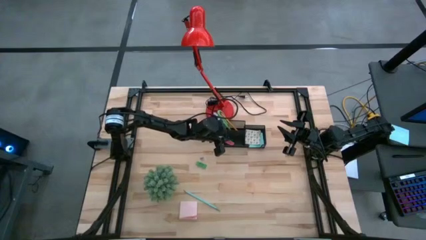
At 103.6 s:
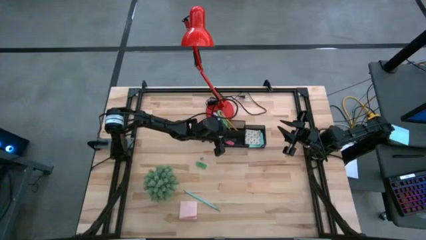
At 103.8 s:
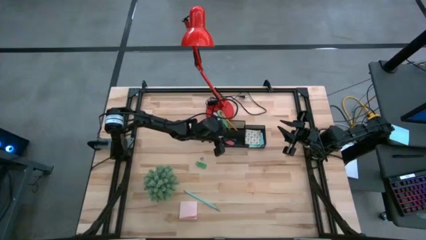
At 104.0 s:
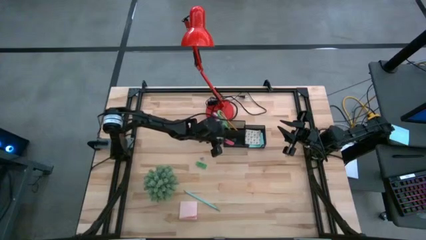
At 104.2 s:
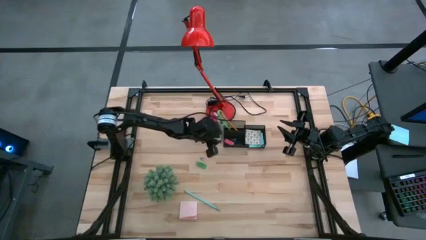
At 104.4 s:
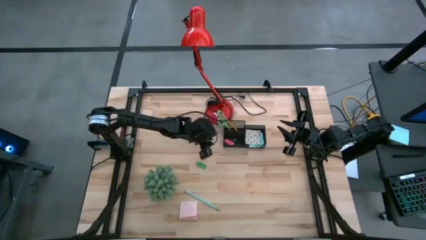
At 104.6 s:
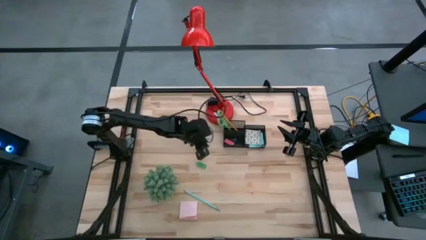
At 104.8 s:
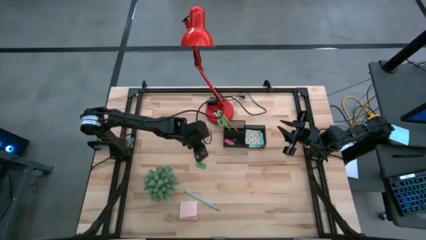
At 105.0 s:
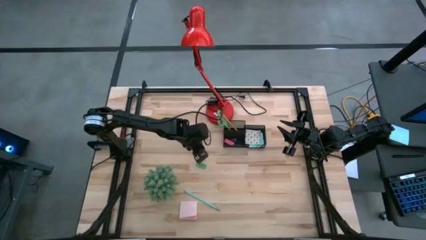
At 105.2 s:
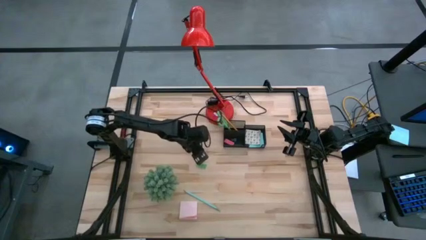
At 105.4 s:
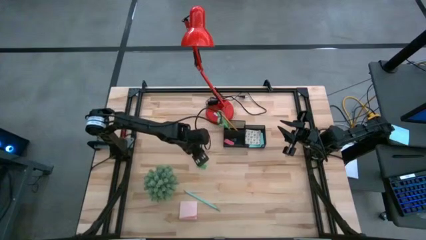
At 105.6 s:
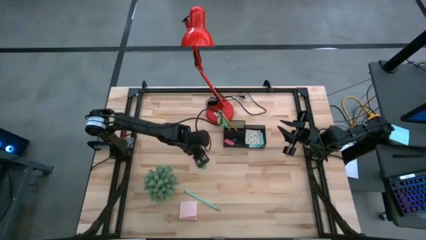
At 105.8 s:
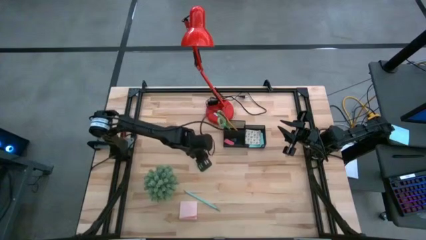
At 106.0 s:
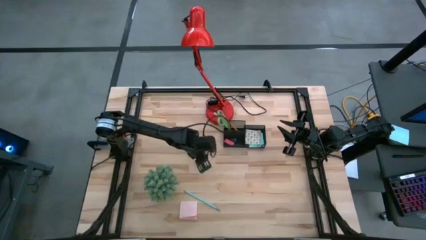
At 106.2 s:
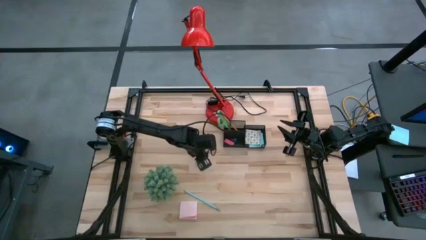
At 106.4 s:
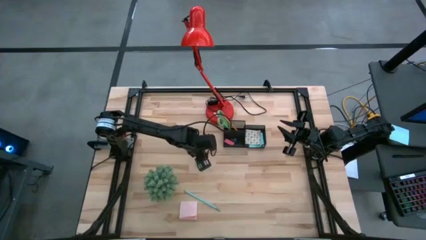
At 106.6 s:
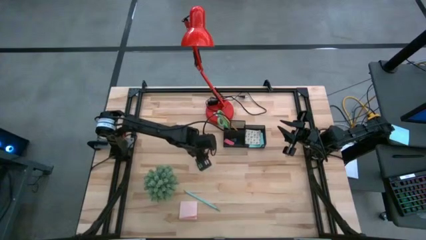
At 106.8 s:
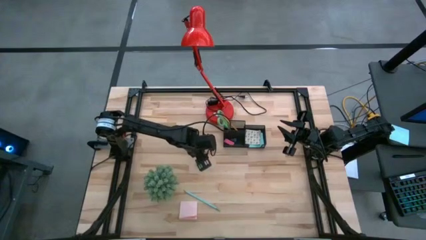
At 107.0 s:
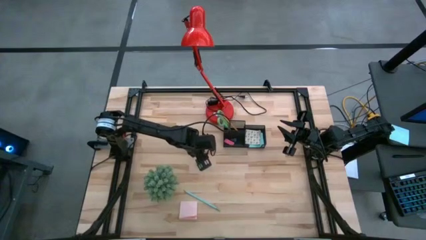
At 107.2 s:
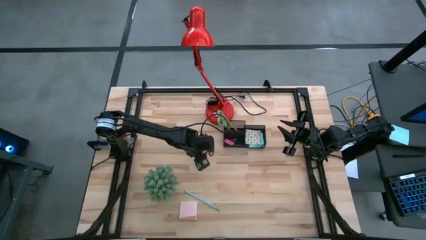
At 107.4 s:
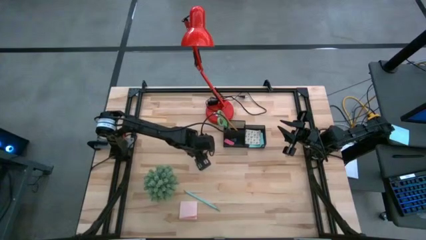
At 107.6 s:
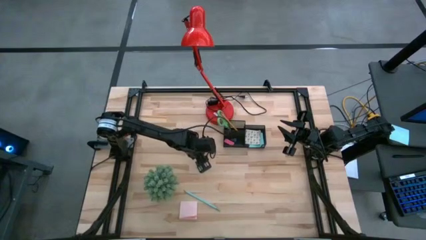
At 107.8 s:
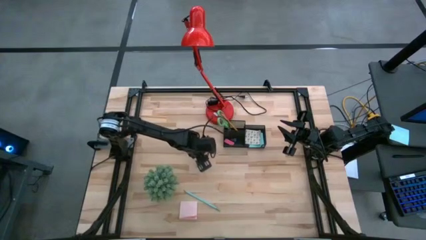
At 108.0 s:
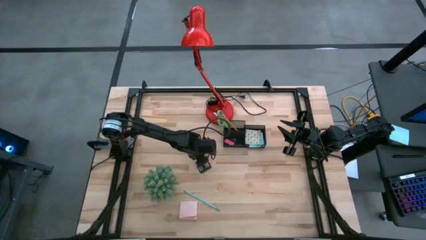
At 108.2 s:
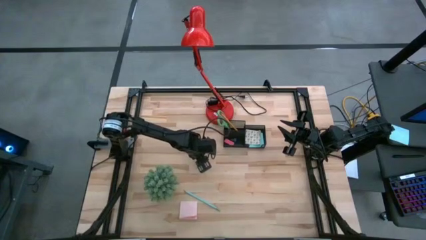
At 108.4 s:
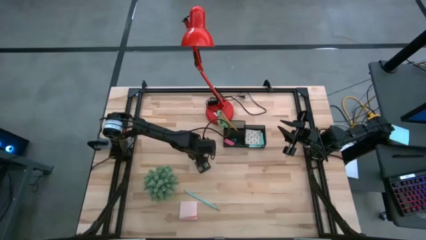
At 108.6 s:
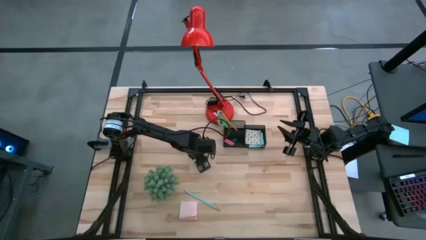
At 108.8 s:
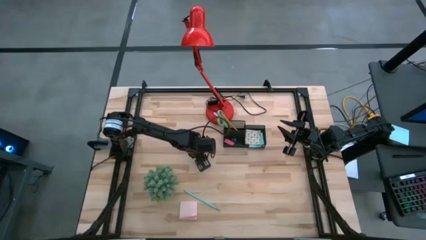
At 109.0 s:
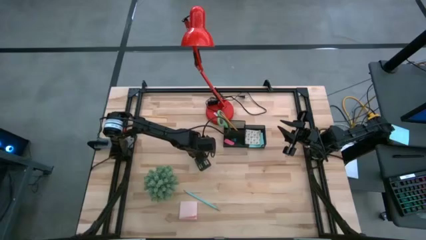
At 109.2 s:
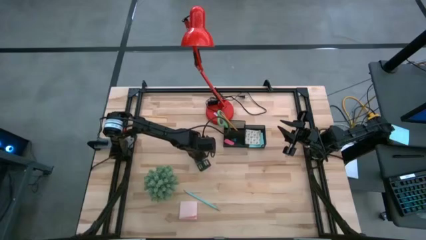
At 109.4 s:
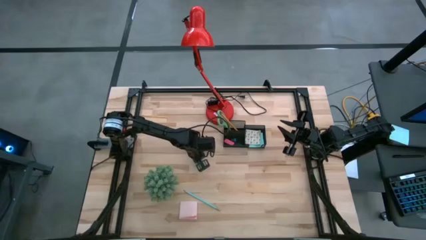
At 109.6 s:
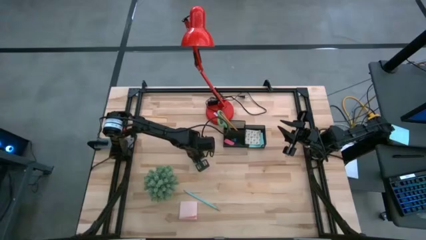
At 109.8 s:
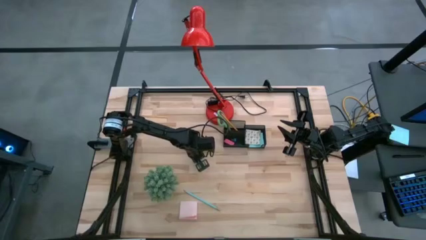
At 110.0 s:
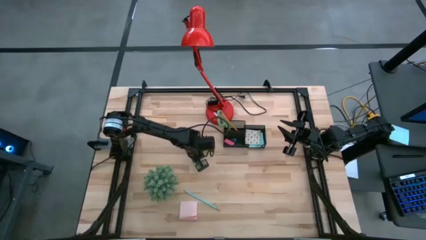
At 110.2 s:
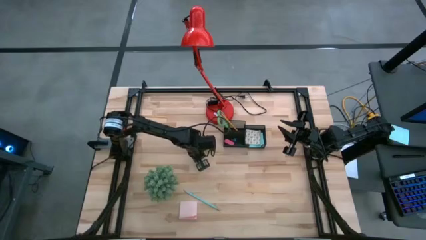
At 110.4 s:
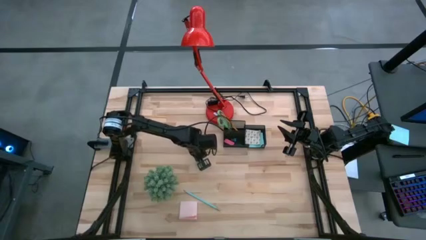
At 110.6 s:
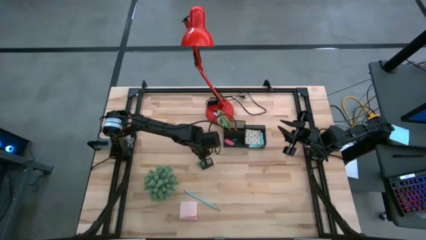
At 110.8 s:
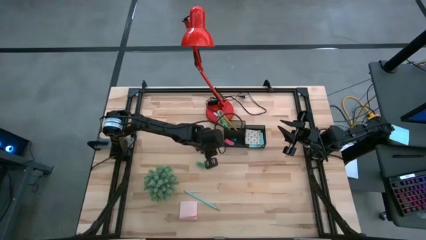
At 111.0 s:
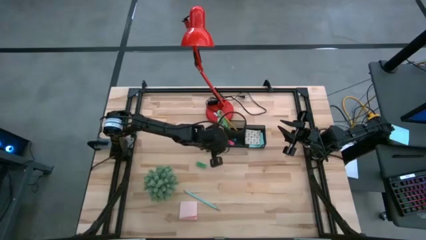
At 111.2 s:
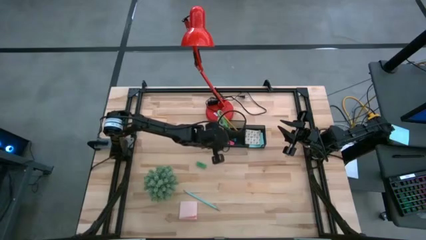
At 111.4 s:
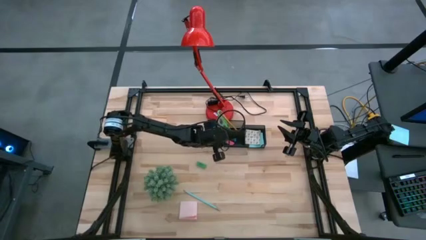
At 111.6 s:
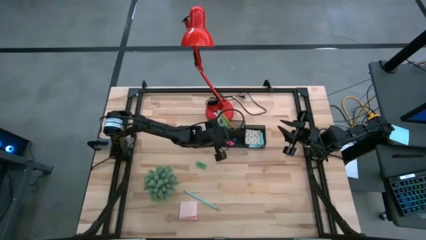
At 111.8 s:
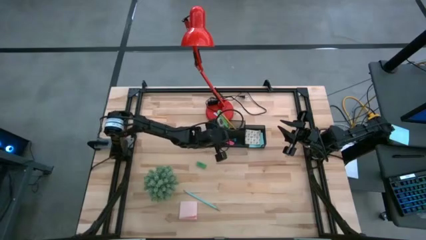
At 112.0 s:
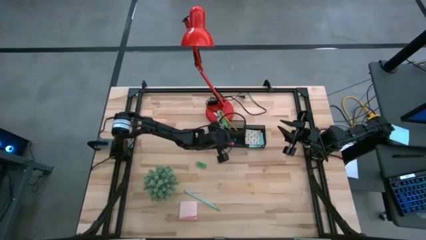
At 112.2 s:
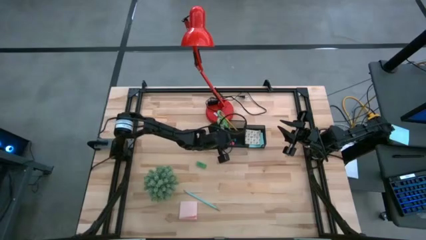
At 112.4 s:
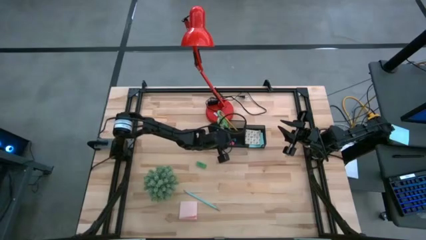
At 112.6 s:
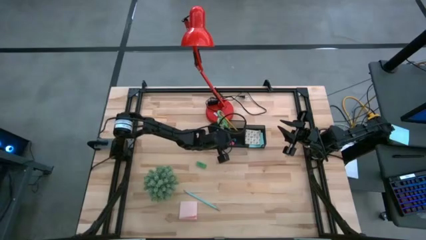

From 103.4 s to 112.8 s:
Task: Pick and place office supplies into organizer
Put the binder clip into the front left compartment of the desk organizer

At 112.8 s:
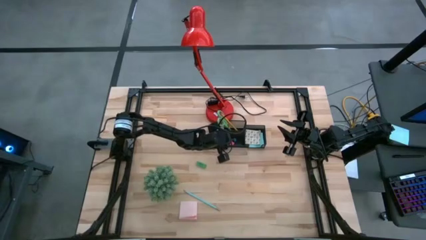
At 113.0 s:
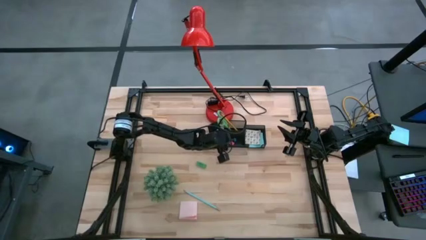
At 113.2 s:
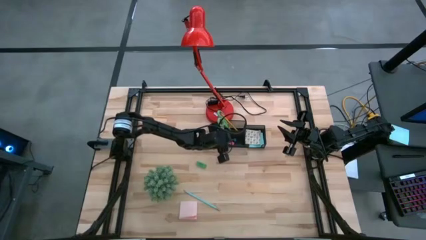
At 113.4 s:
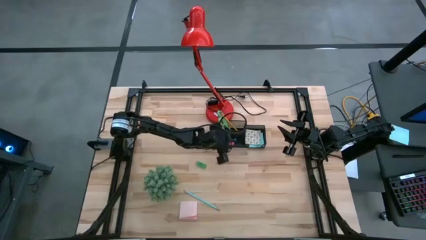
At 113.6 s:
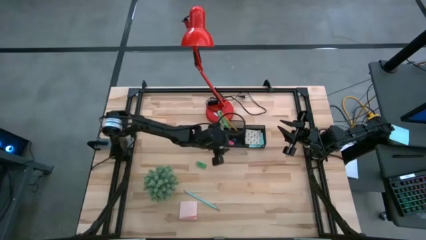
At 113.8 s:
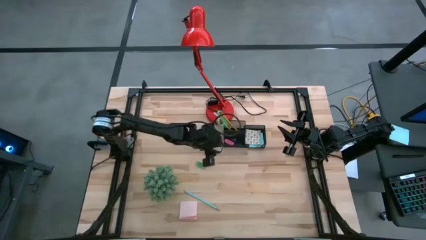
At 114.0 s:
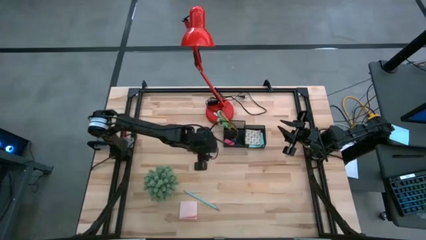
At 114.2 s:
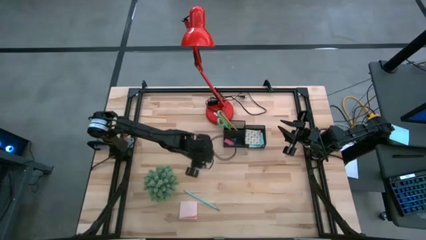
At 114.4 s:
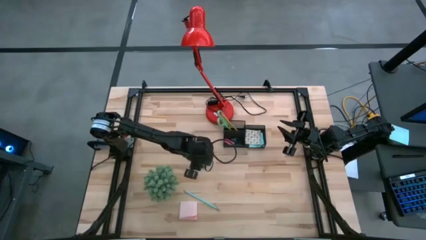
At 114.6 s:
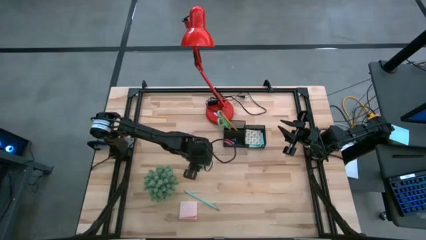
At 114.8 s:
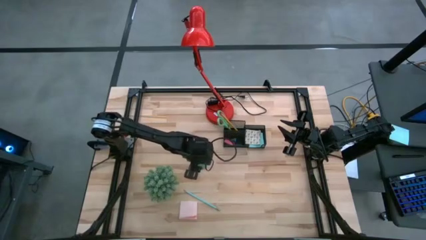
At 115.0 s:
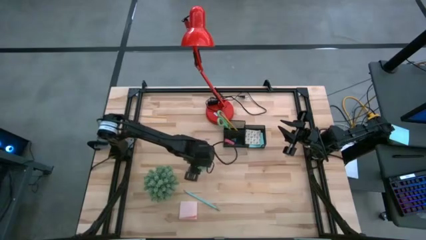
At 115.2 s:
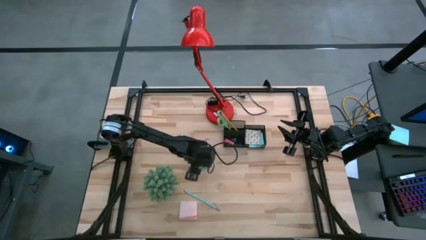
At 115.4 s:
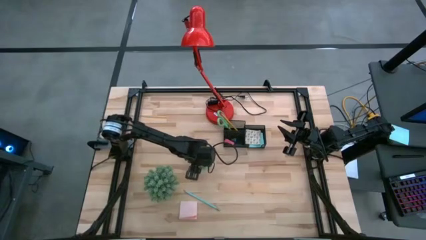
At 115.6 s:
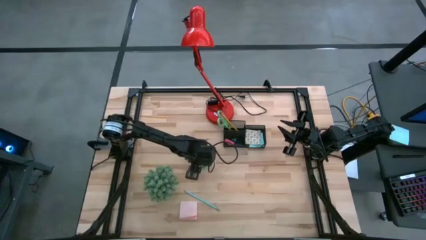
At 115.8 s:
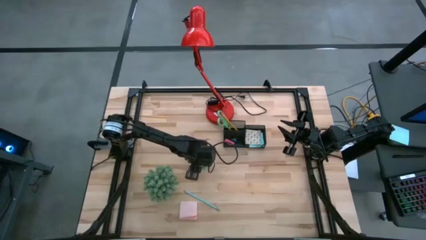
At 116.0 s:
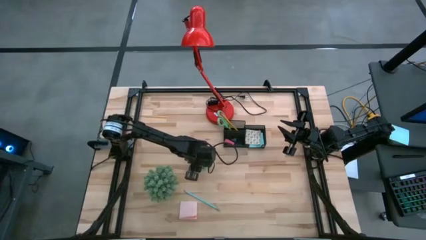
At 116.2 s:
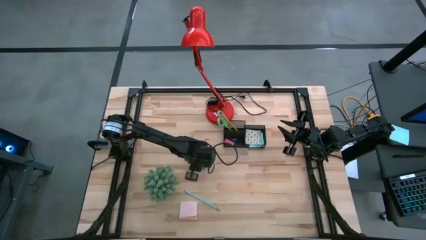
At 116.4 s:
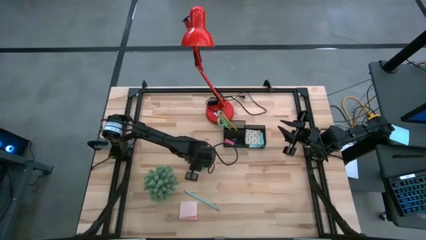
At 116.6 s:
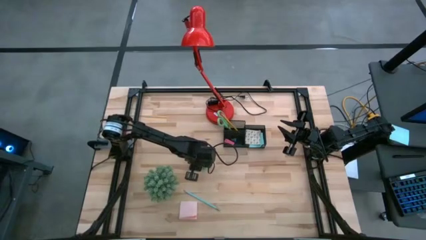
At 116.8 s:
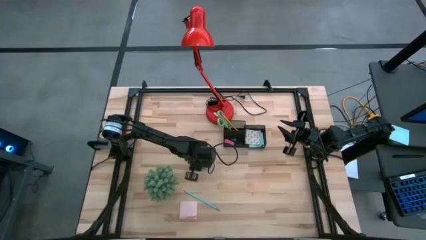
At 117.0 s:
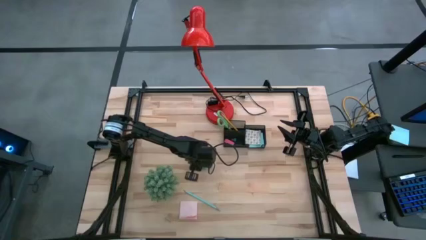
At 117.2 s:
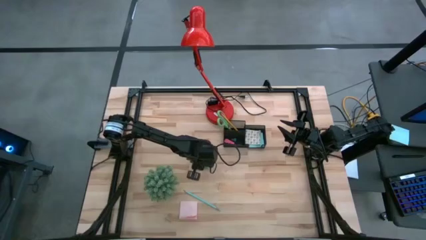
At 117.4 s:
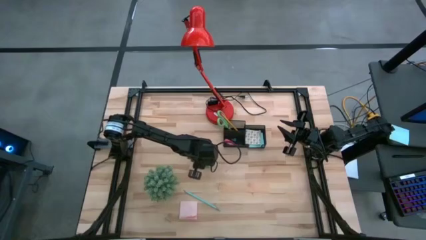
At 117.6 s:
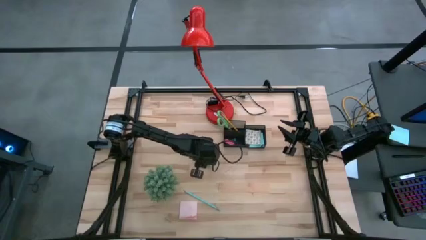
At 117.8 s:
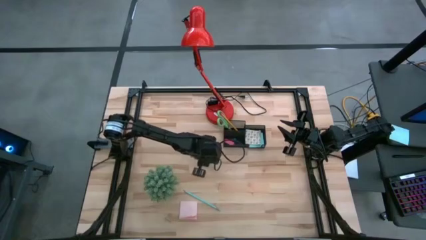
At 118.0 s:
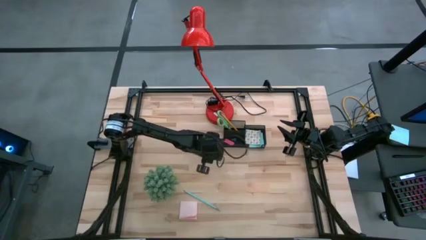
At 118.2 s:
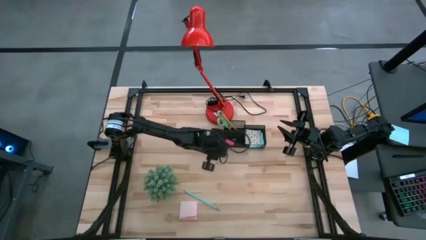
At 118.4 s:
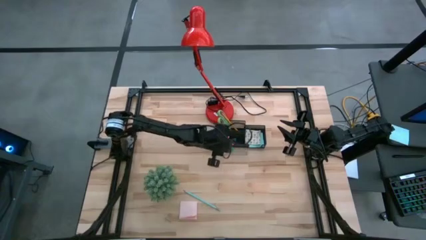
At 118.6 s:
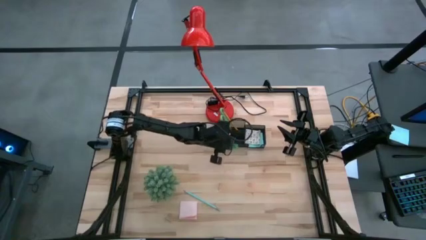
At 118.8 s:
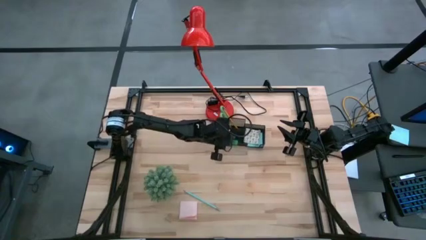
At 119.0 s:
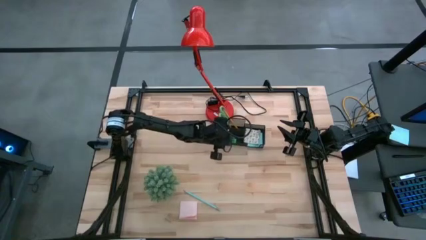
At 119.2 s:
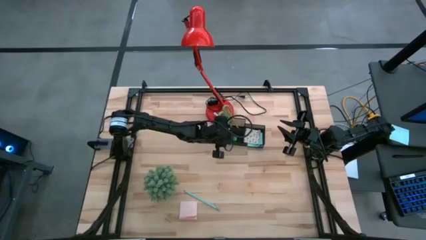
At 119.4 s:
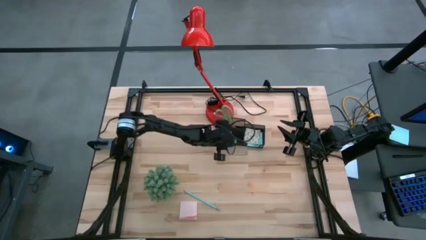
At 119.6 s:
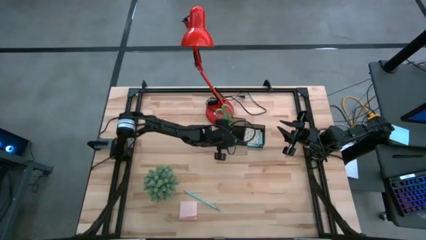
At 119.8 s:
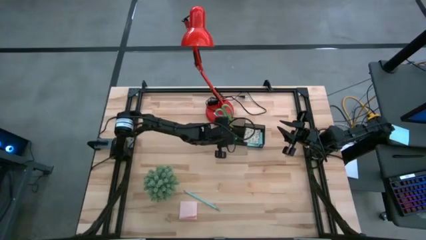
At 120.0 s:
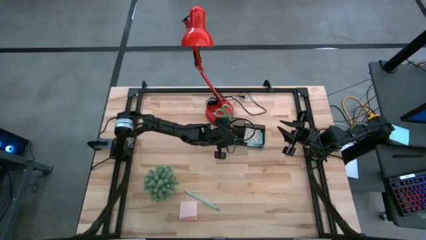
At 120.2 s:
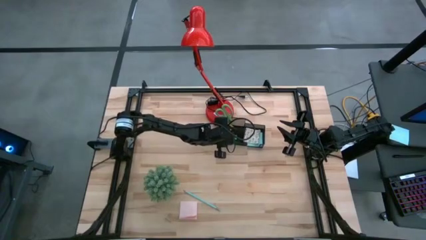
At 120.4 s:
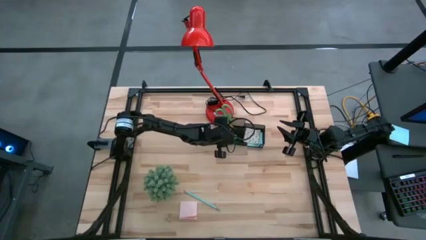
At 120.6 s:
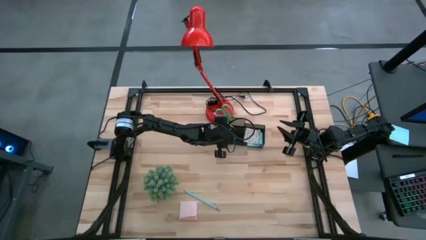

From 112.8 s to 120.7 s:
Put the green eraser into the front left compartment of the desk organizer
